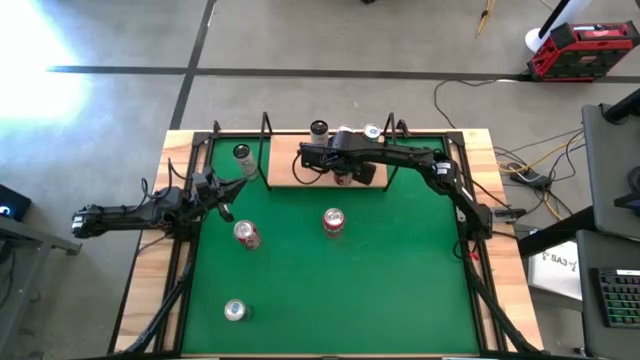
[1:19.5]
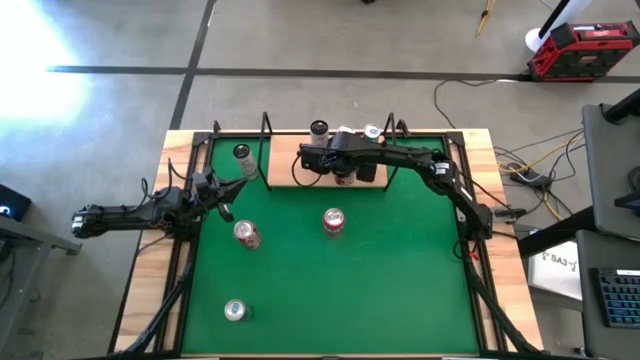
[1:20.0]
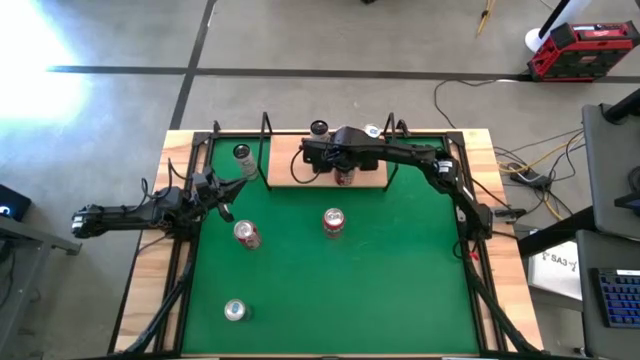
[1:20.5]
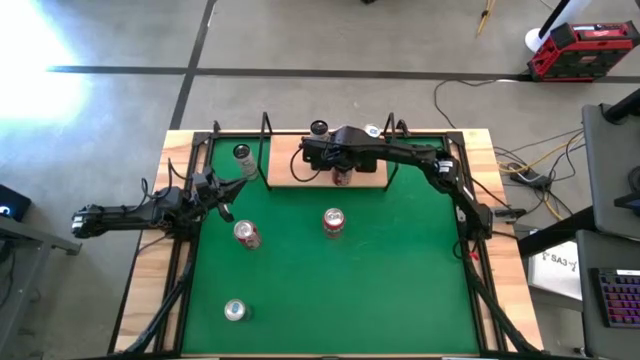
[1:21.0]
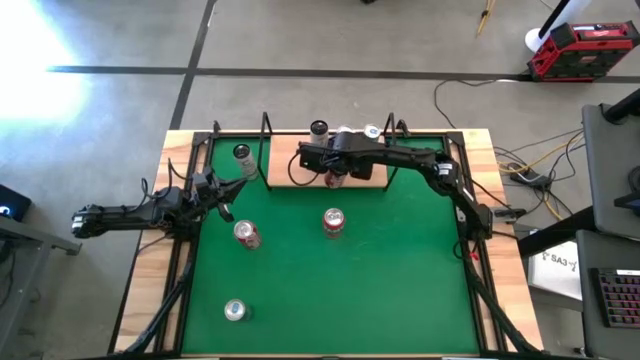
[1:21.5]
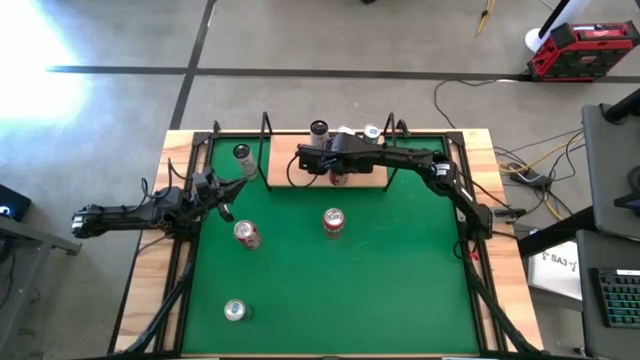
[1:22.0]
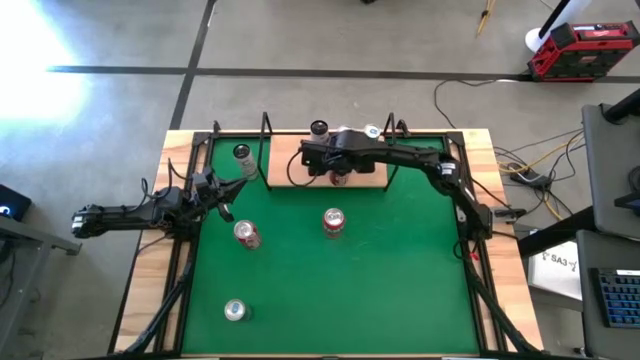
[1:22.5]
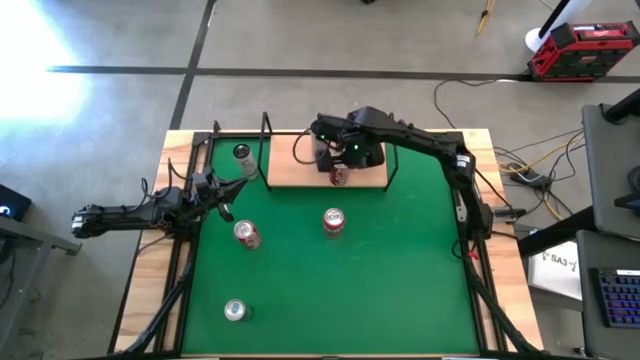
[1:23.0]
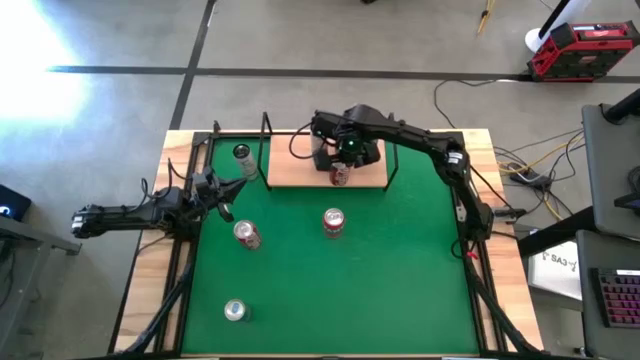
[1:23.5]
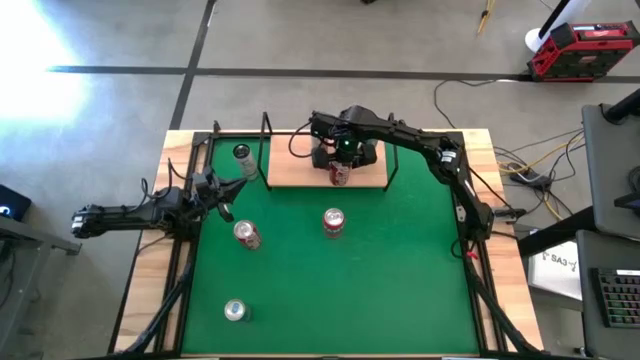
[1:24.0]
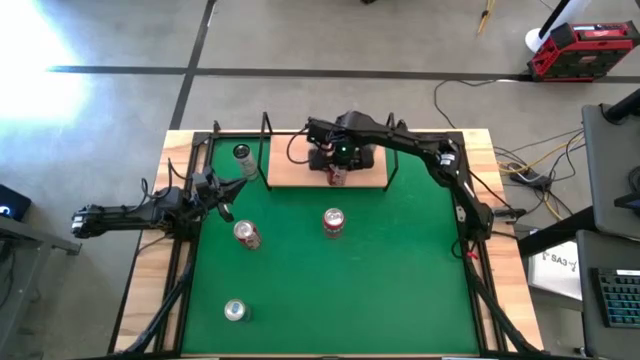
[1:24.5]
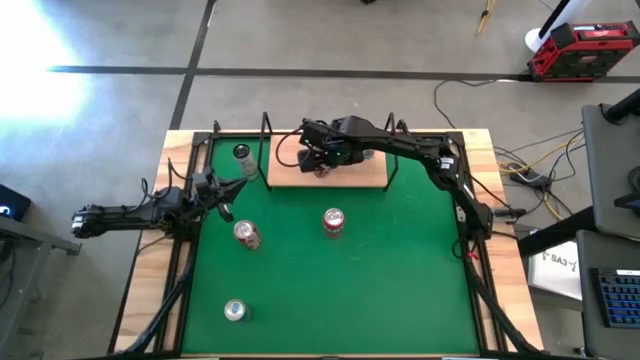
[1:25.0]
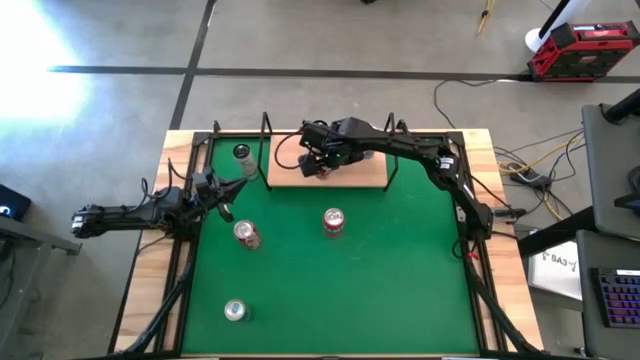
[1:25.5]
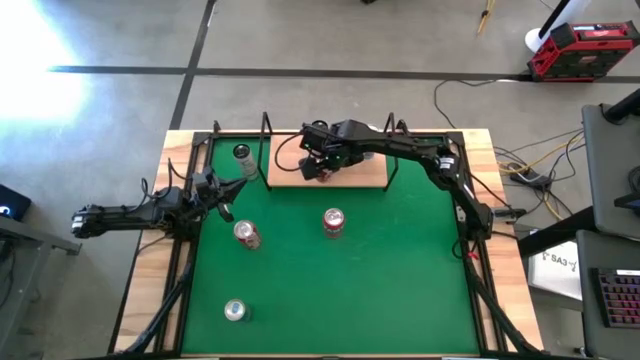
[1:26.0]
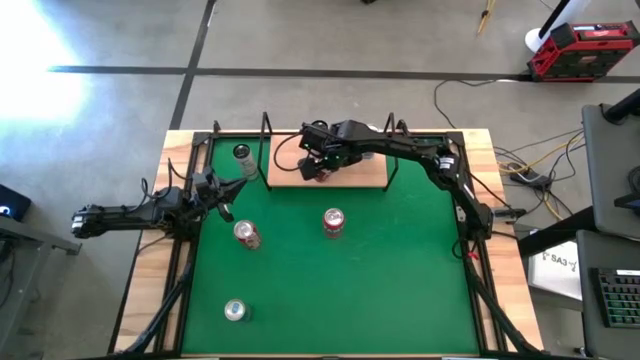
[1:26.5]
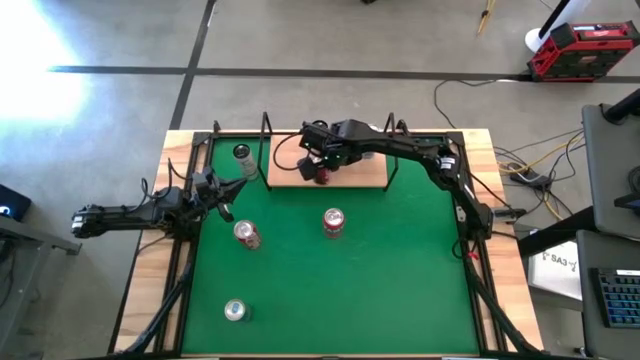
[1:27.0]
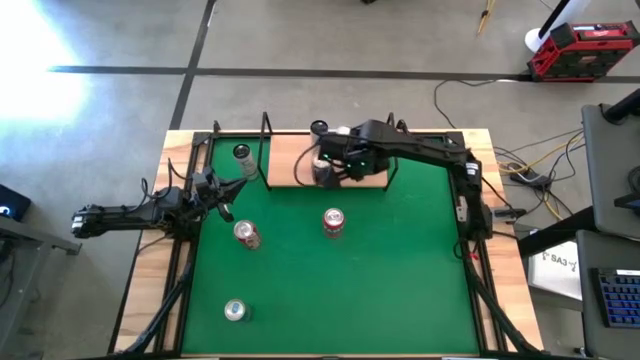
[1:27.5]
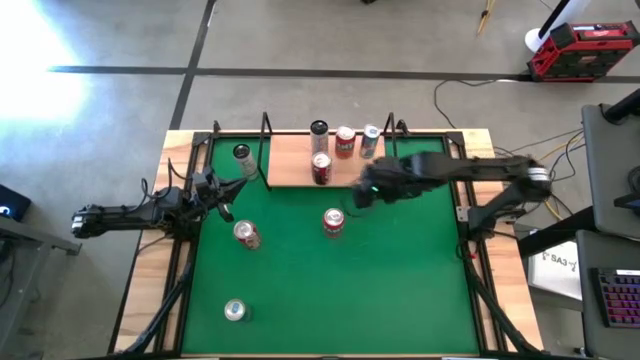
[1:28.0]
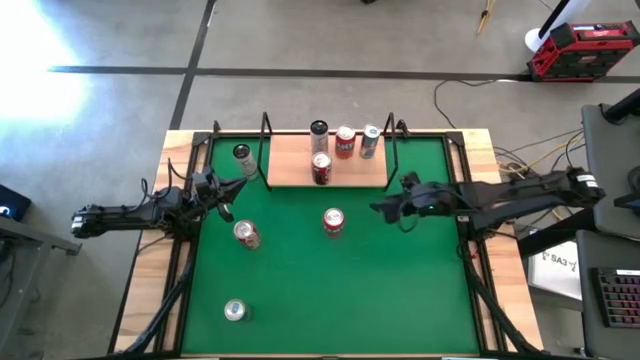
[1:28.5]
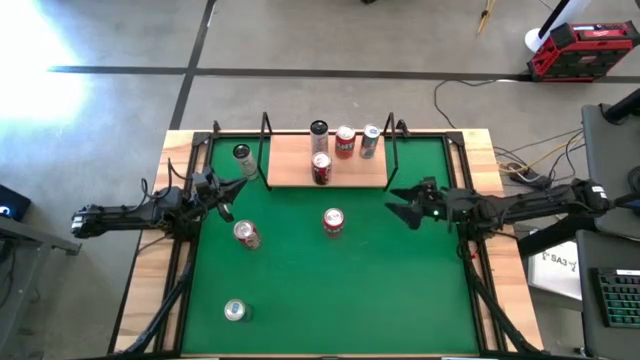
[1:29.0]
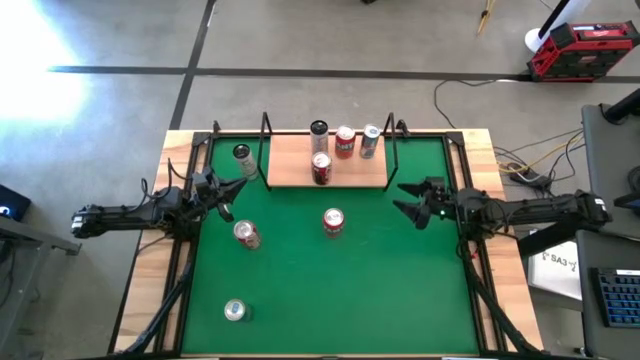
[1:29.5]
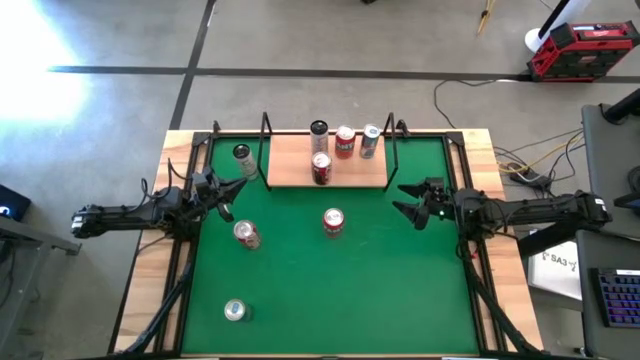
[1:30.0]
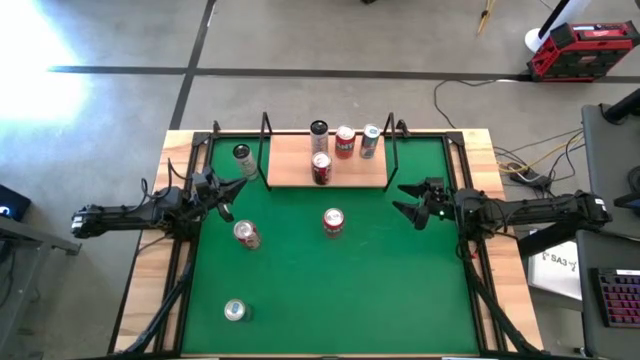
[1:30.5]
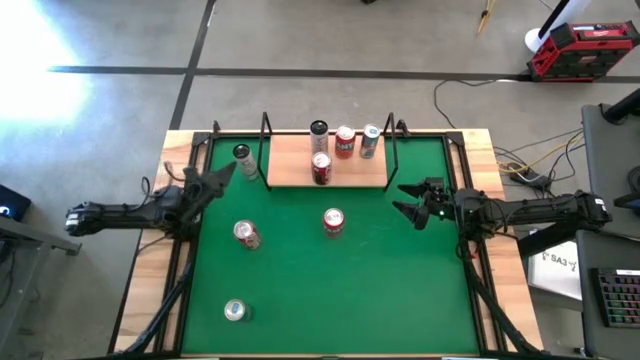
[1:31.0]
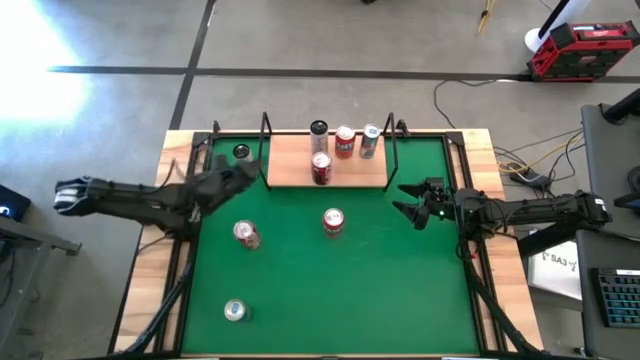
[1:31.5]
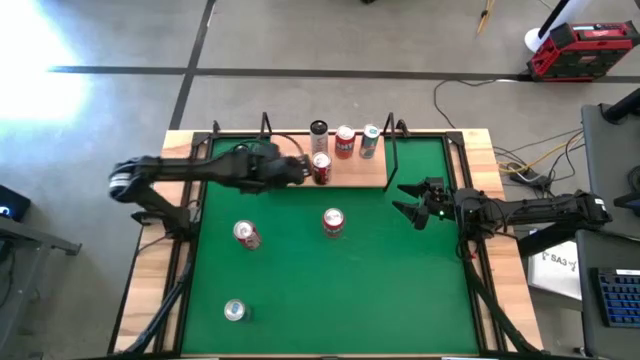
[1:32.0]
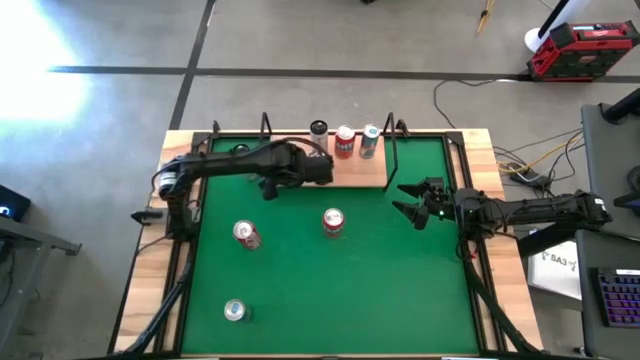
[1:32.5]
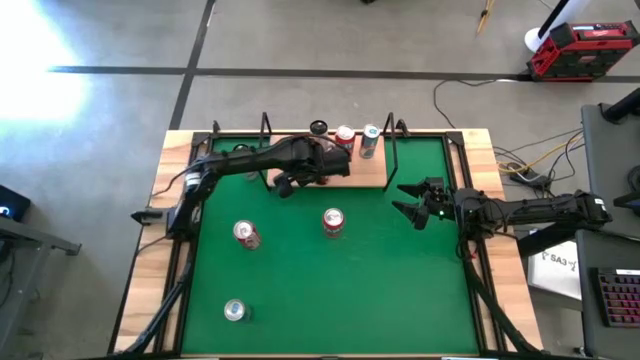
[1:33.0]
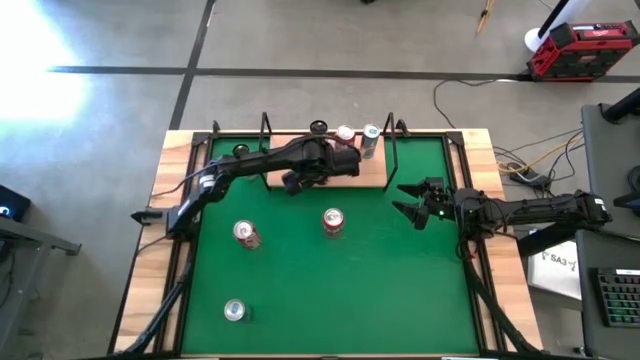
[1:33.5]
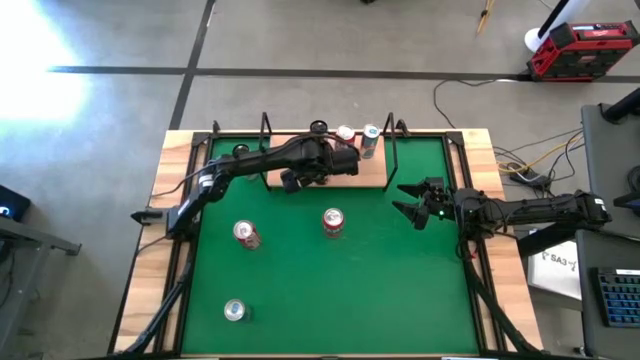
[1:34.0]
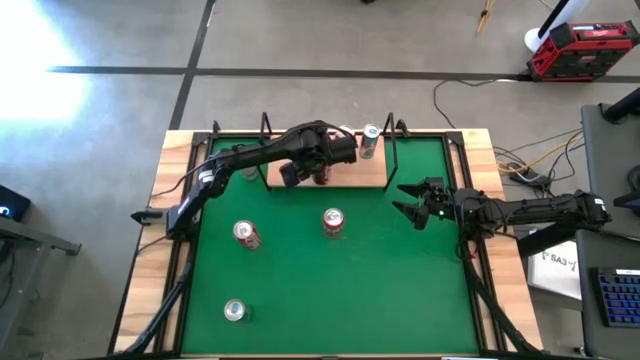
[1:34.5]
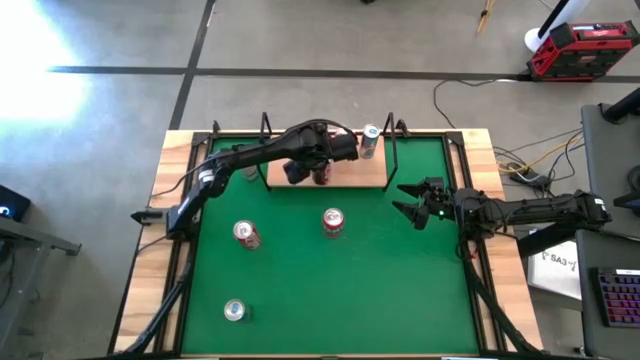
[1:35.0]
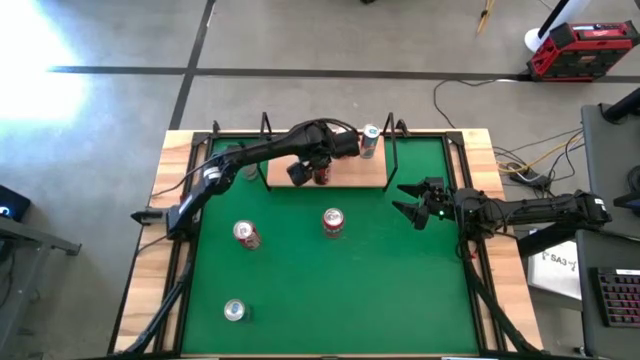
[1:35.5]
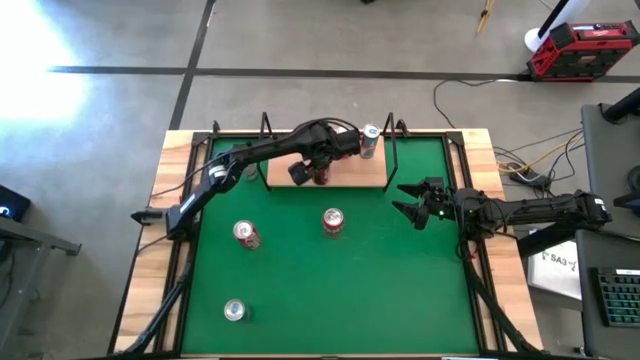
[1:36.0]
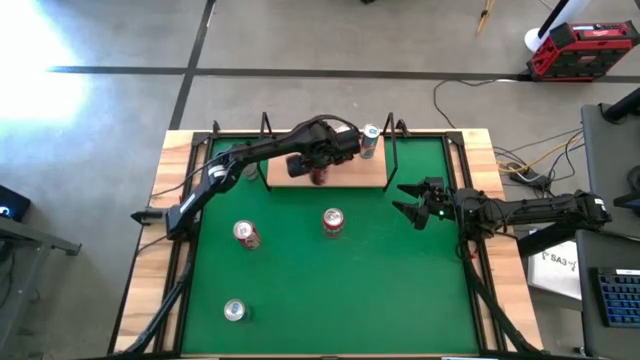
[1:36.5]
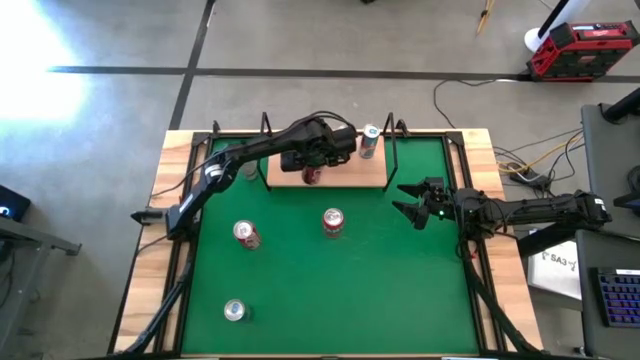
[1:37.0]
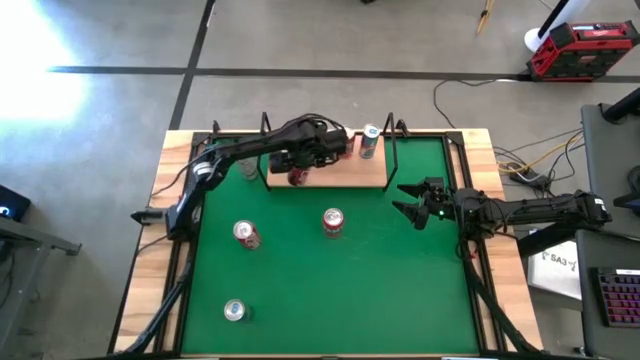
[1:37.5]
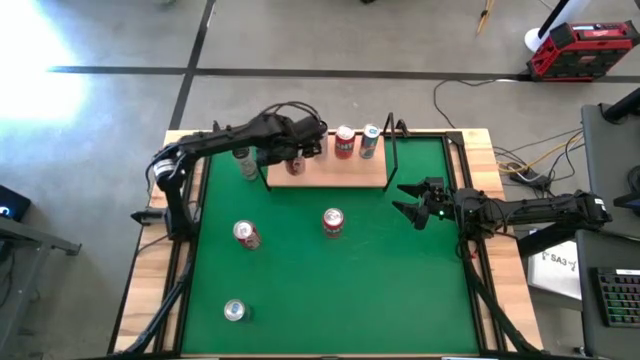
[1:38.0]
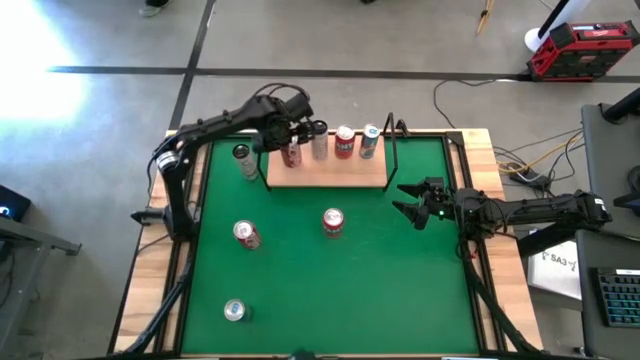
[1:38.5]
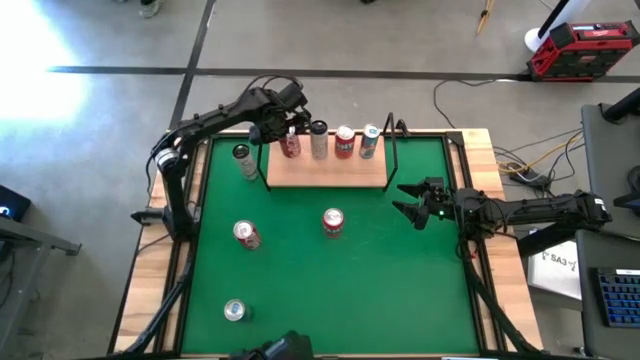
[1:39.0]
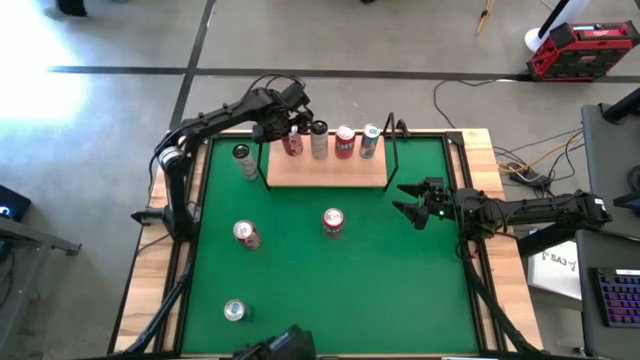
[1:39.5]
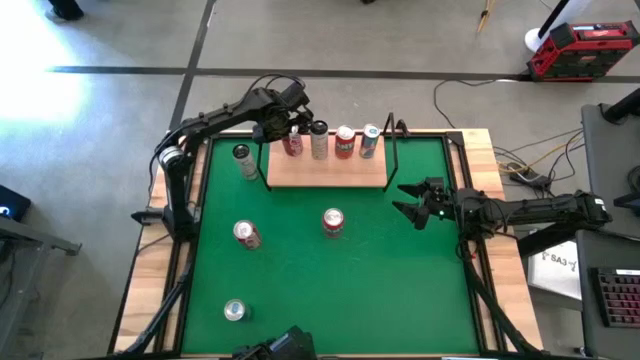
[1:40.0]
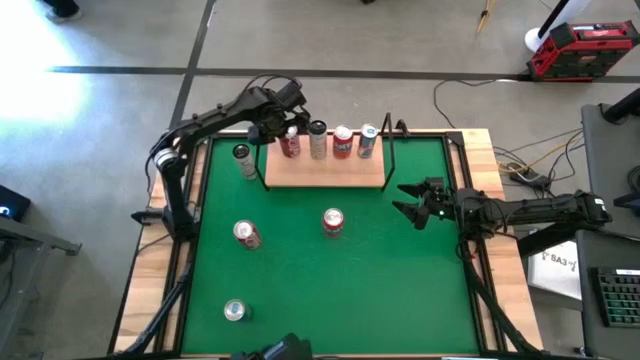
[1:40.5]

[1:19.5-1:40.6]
Task: Place canned beverage on shelf
Put the bottom red-white soda can on the shelf
